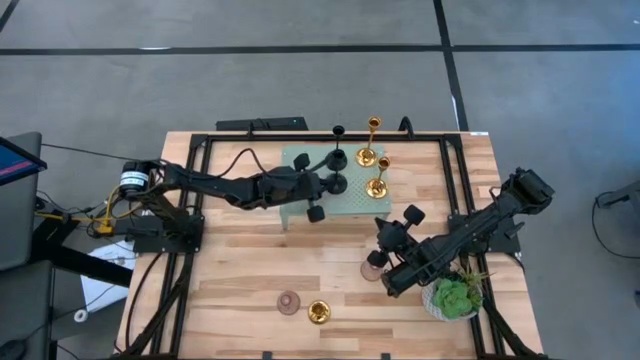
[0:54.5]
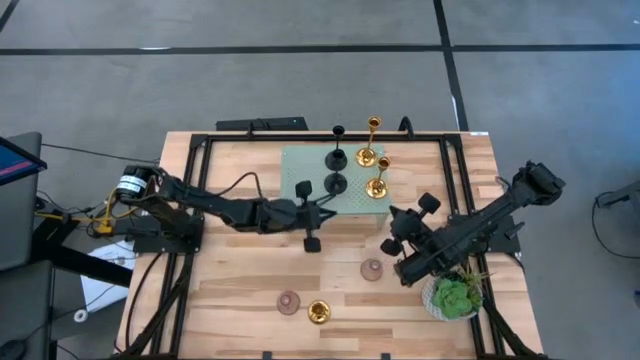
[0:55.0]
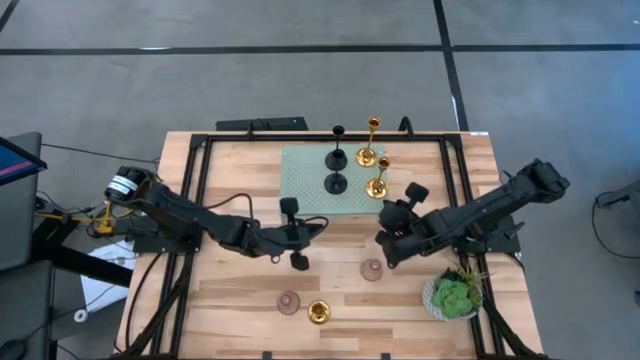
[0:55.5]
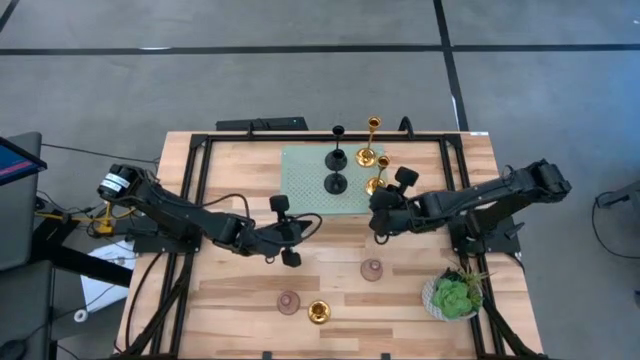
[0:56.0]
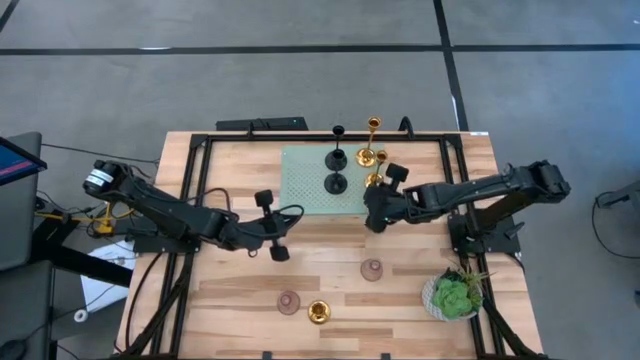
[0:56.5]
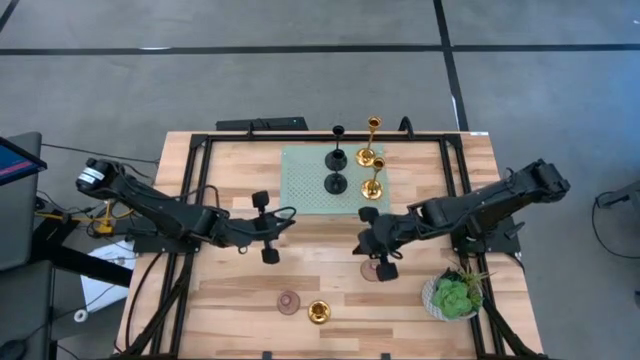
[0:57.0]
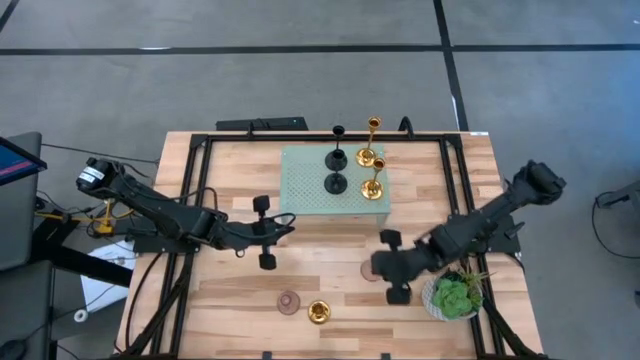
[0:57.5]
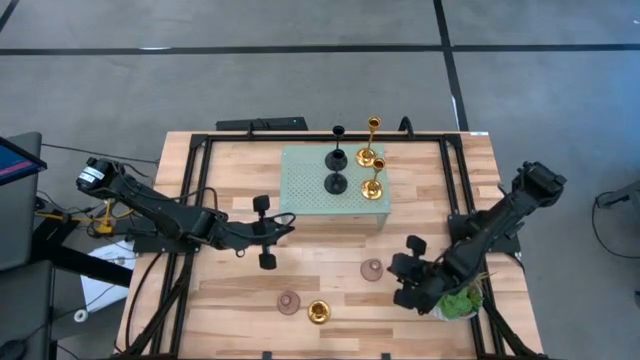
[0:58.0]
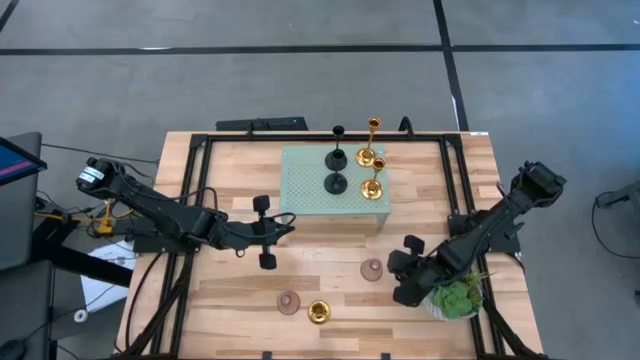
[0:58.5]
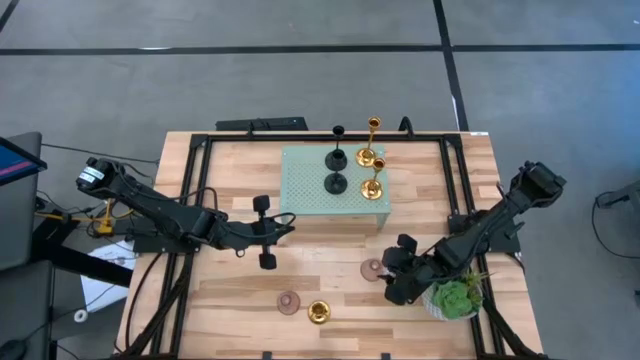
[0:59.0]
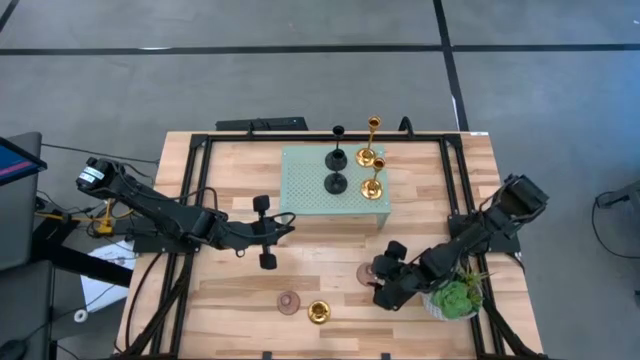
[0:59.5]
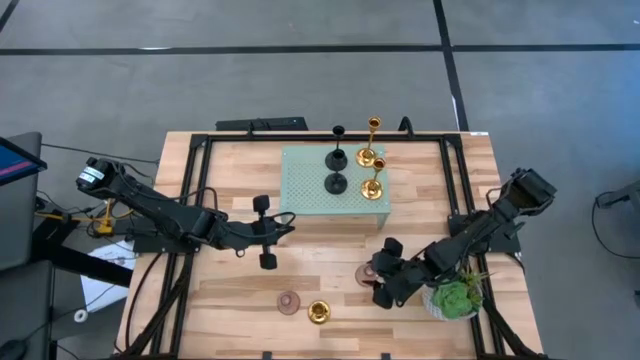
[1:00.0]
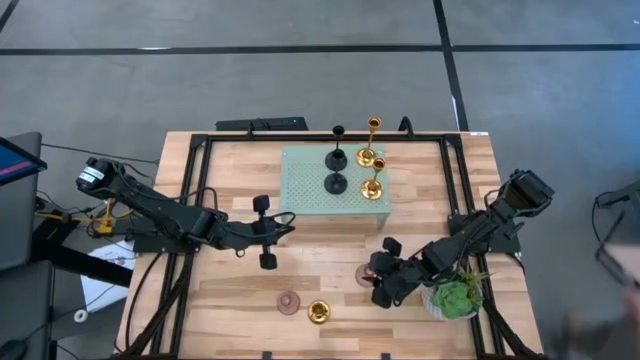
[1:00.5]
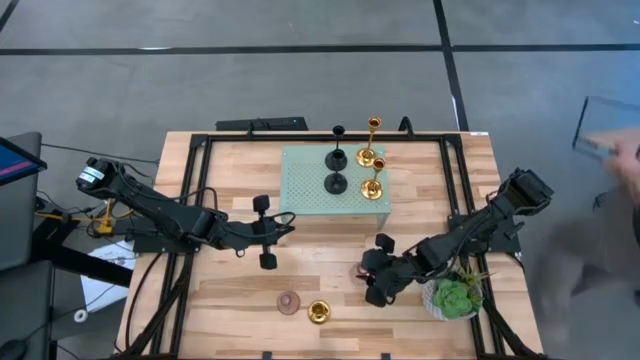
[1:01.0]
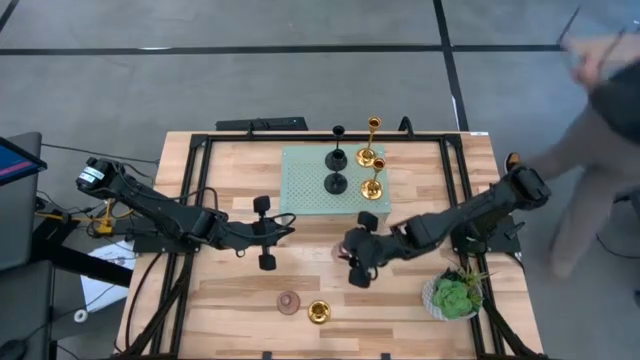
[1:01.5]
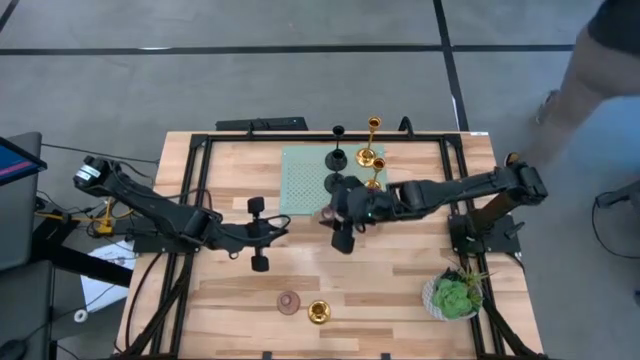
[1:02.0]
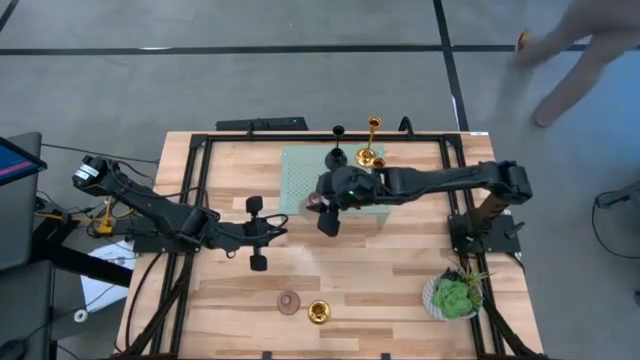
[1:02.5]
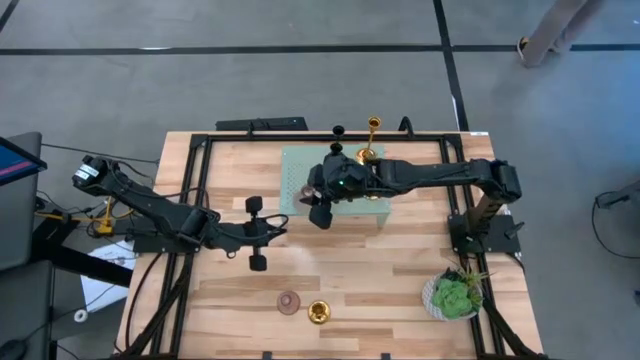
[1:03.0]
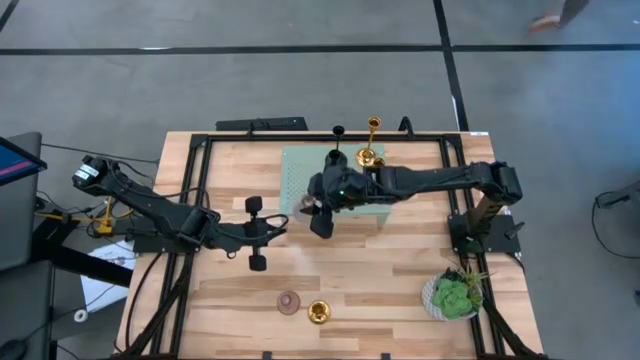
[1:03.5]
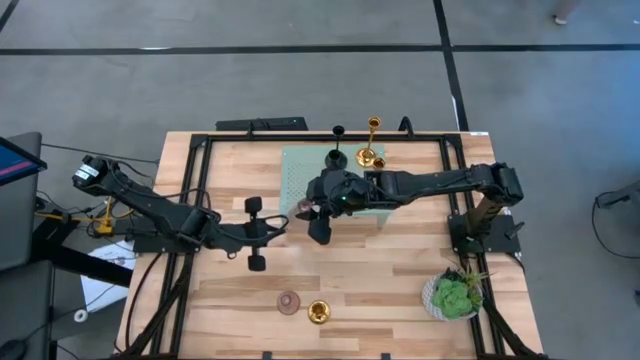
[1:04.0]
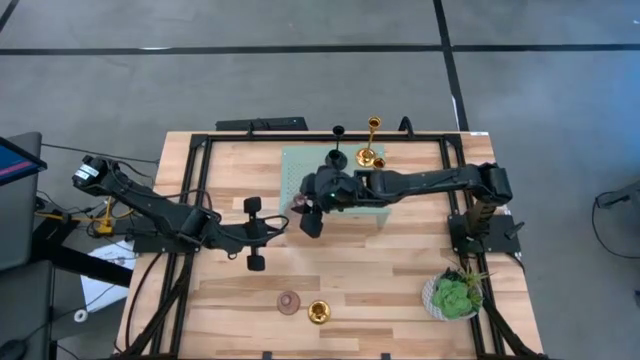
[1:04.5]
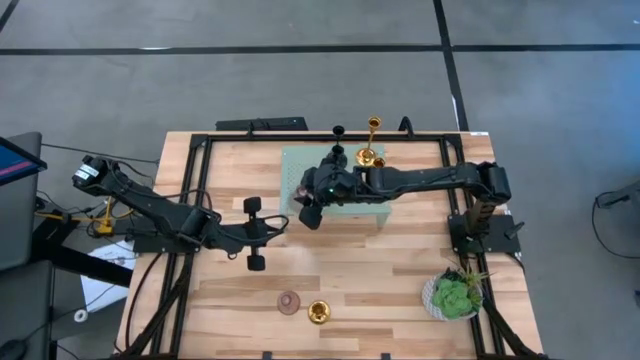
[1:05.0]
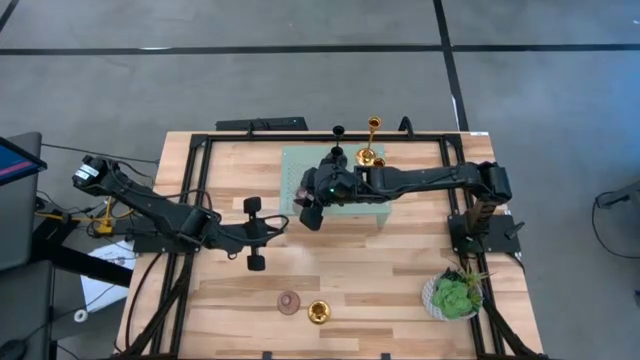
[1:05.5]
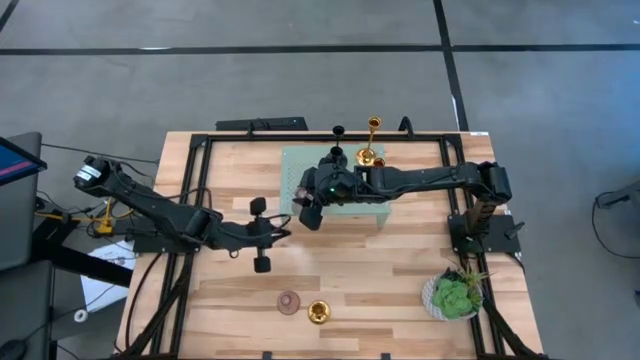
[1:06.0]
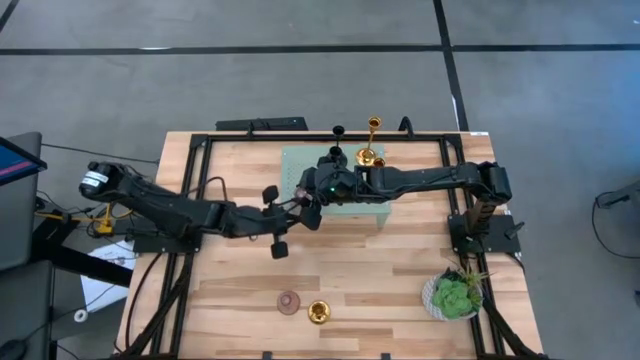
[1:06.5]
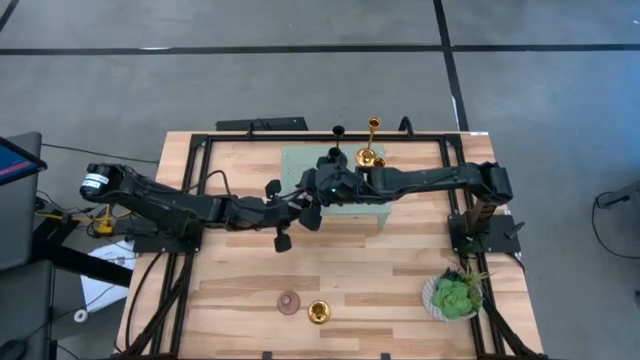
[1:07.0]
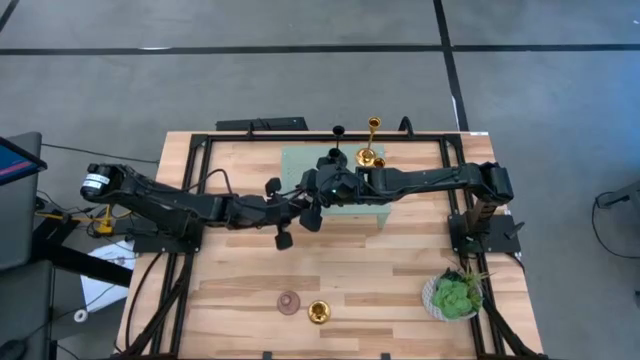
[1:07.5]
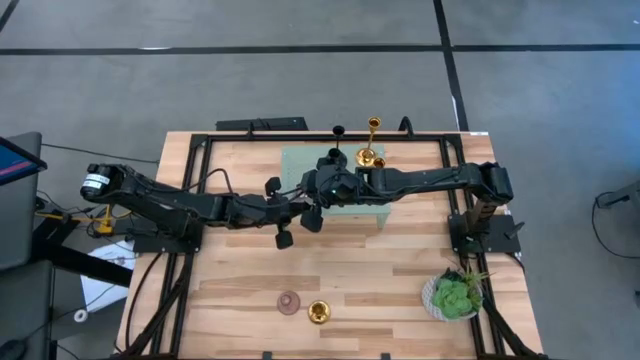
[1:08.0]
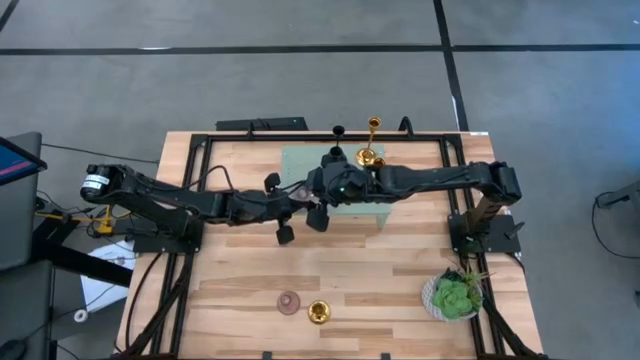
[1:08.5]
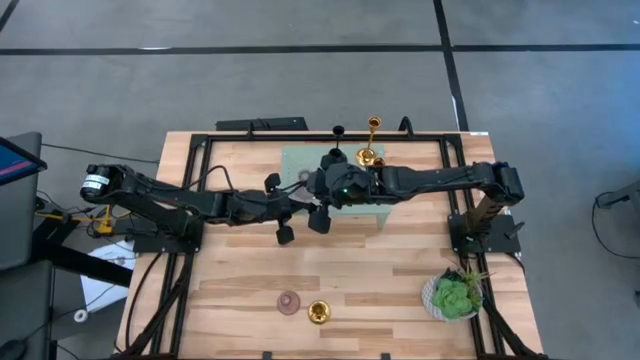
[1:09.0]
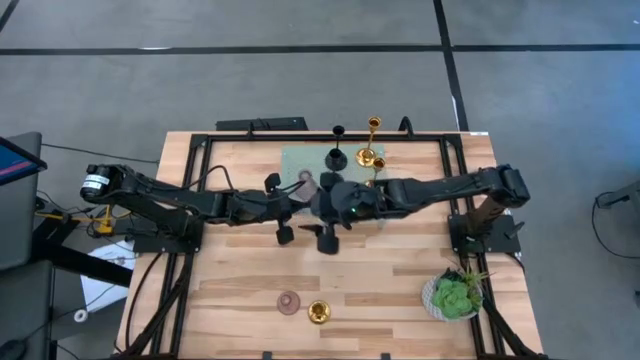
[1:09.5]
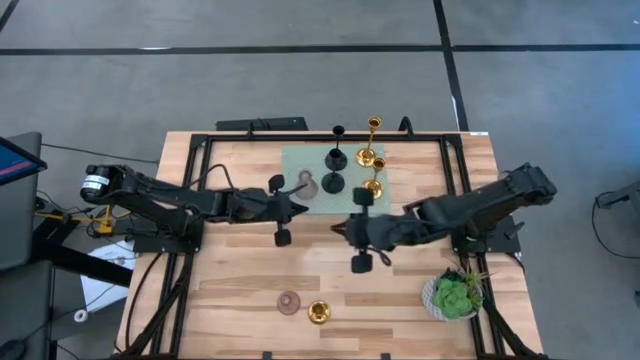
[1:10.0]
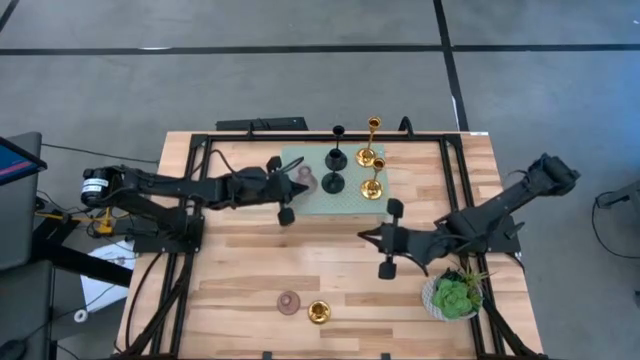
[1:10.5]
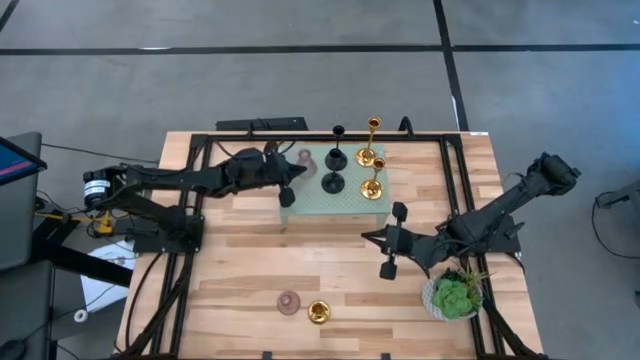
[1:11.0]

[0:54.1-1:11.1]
Task: Pick & Place candle stick holders
Put the right pink candle holder on the shelf

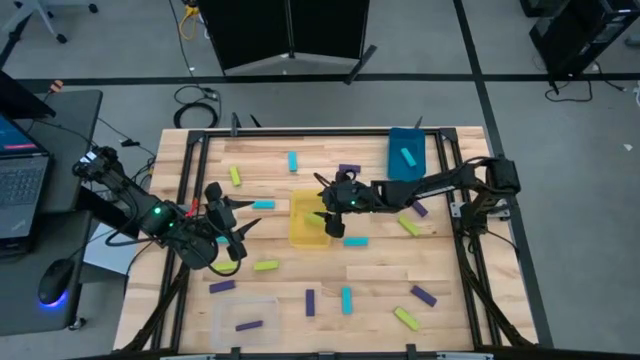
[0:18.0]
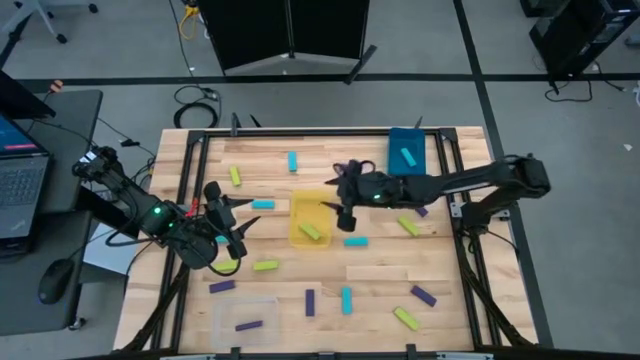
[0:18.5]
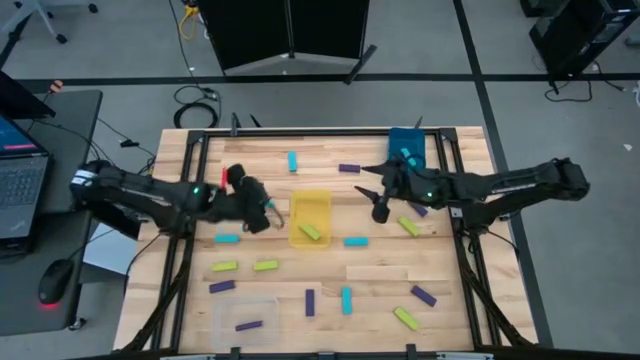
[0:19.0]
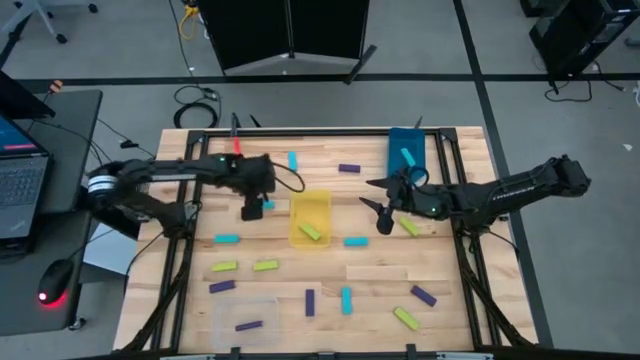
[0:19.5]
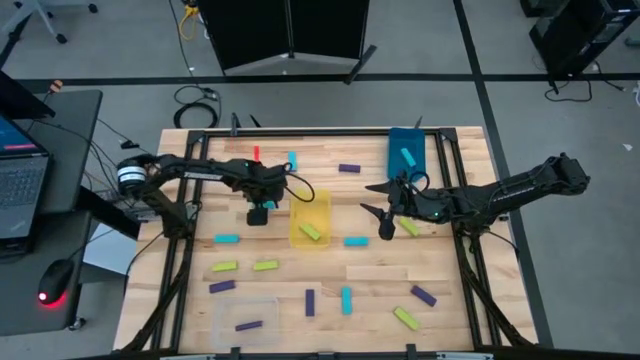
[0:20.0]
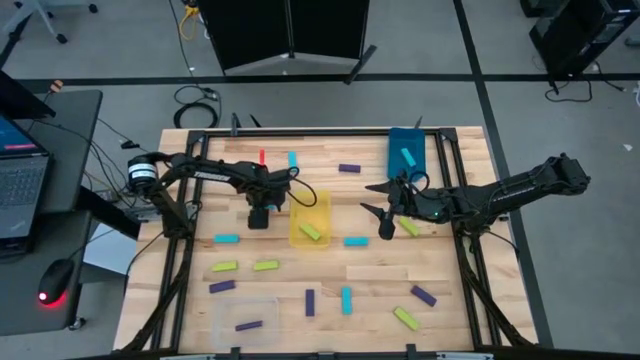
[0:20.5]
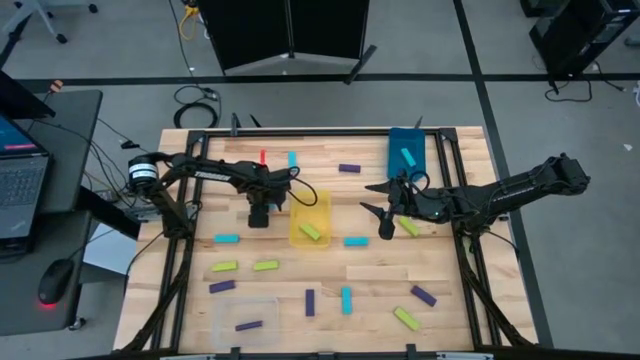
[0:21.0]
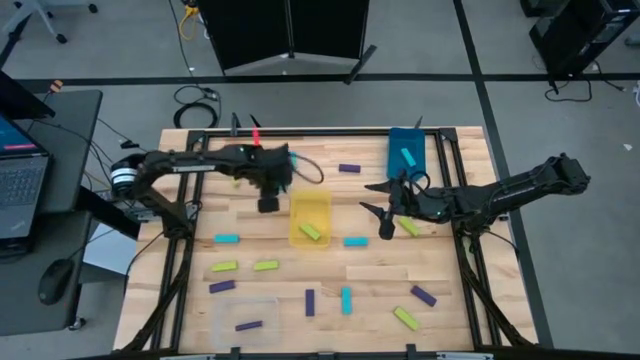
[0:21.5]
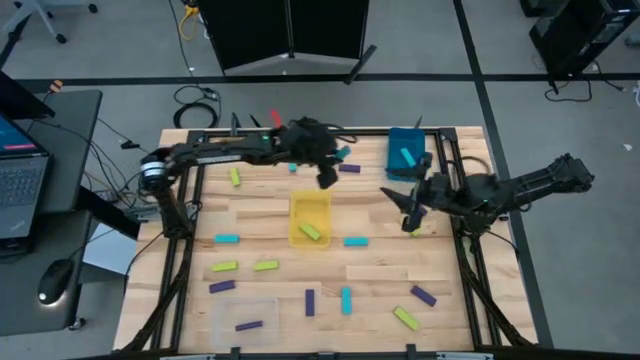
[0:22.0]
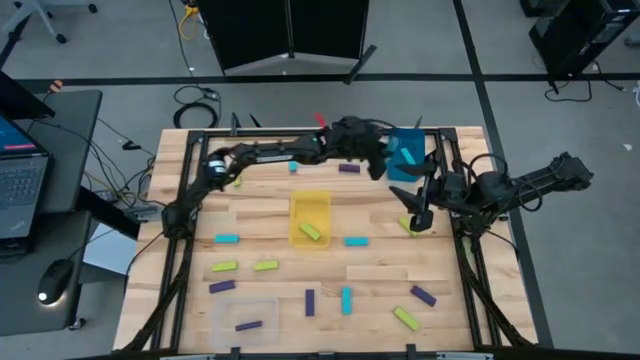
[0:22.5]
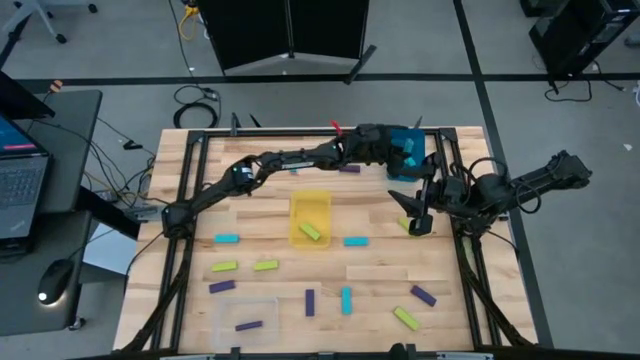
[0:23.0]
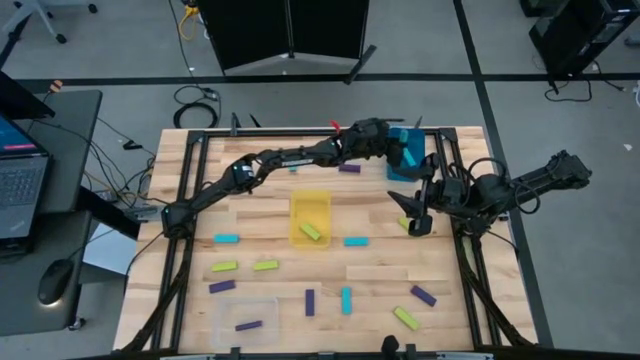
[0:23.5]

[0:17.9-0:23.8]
Task: Sort blocks
Put the light blue block into the blue bin
